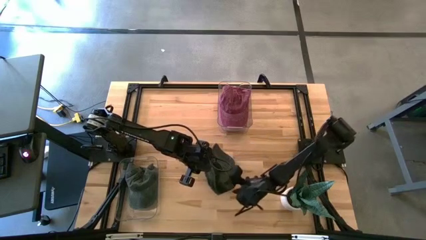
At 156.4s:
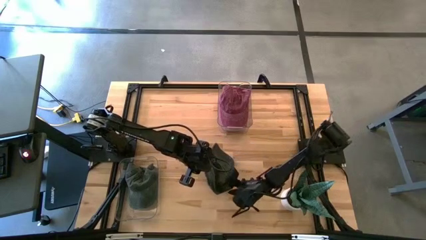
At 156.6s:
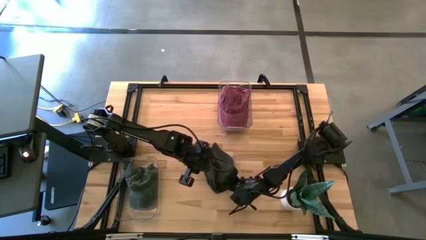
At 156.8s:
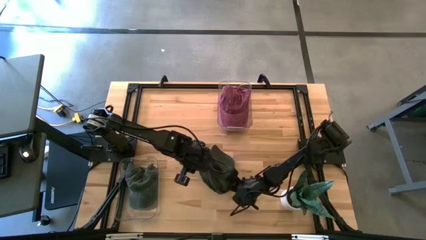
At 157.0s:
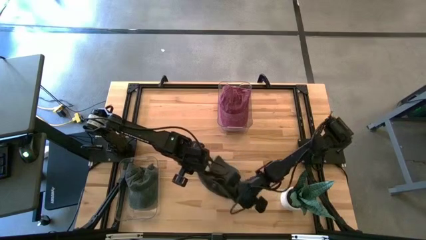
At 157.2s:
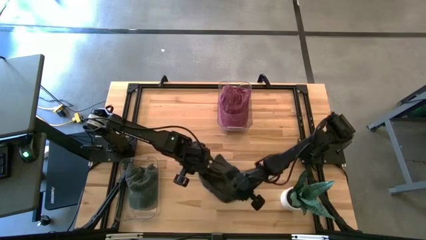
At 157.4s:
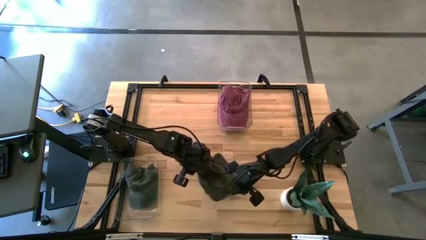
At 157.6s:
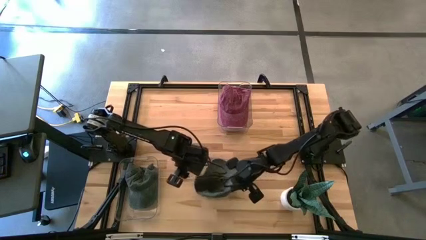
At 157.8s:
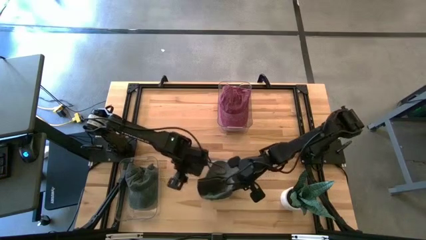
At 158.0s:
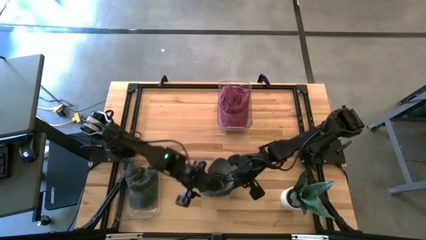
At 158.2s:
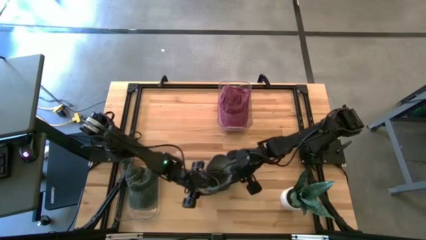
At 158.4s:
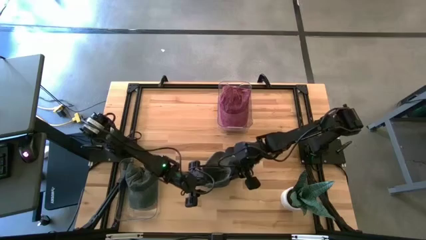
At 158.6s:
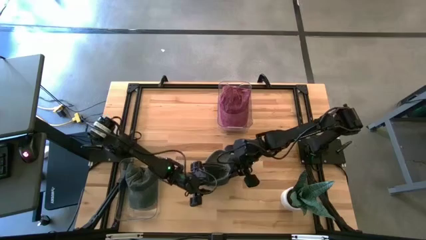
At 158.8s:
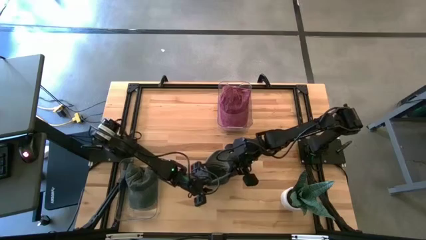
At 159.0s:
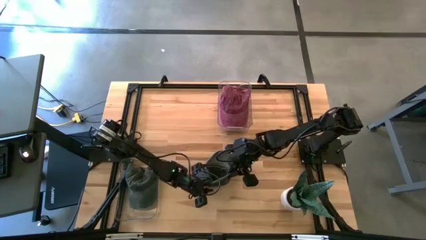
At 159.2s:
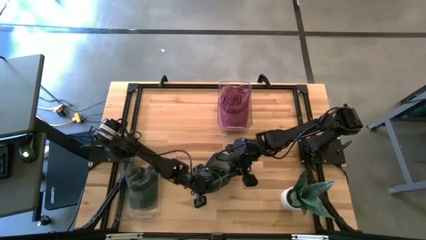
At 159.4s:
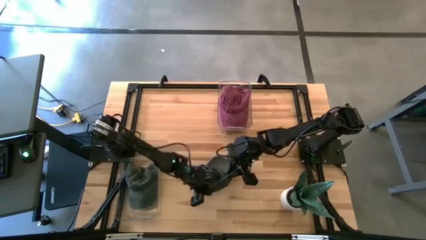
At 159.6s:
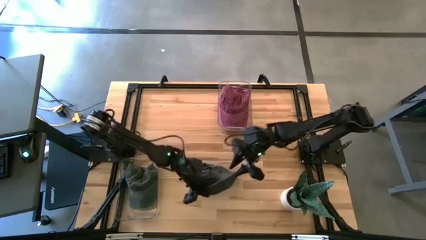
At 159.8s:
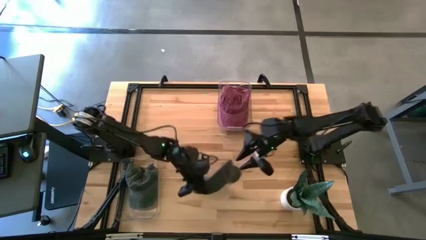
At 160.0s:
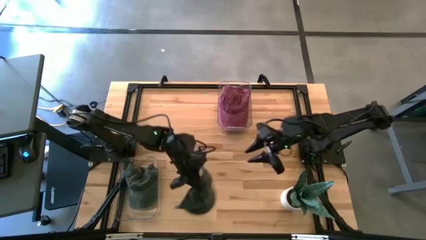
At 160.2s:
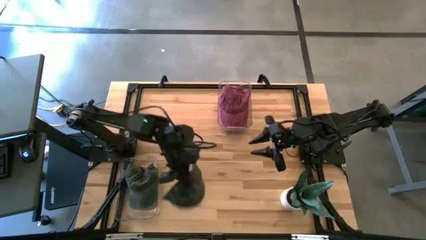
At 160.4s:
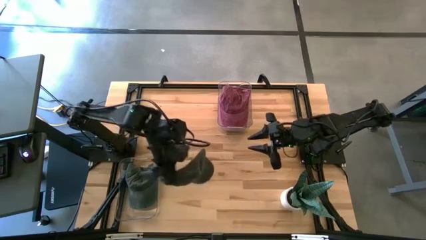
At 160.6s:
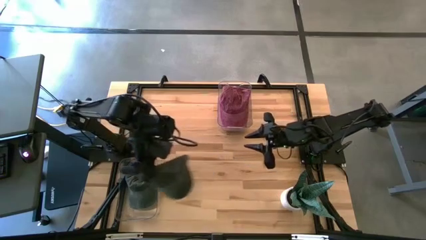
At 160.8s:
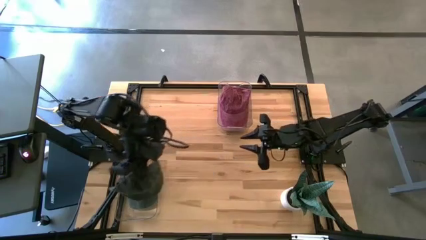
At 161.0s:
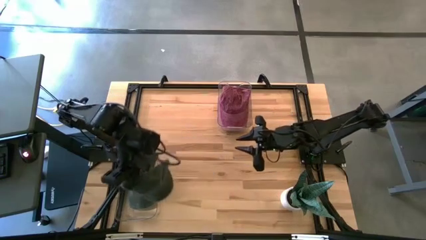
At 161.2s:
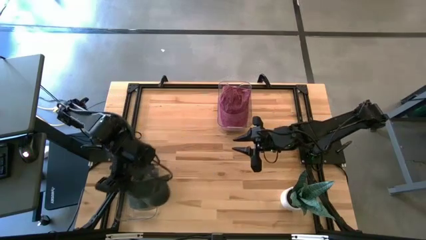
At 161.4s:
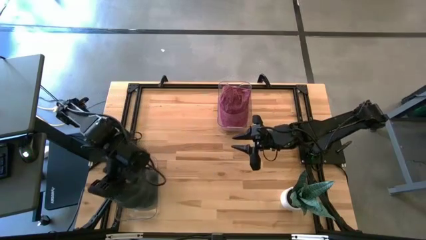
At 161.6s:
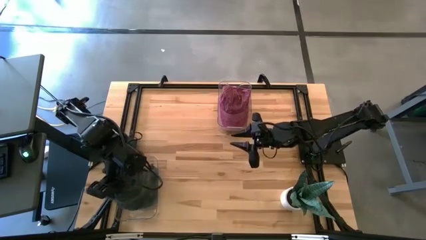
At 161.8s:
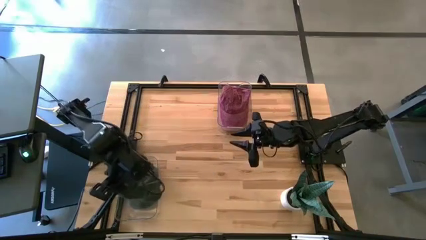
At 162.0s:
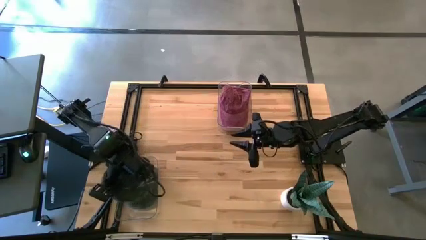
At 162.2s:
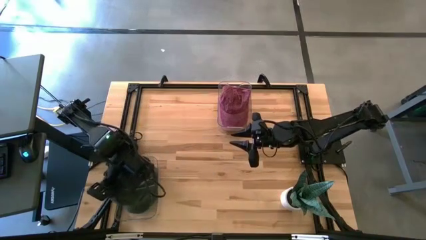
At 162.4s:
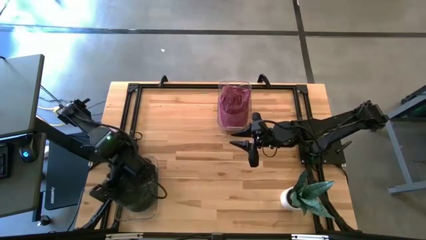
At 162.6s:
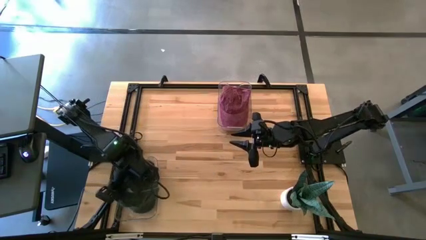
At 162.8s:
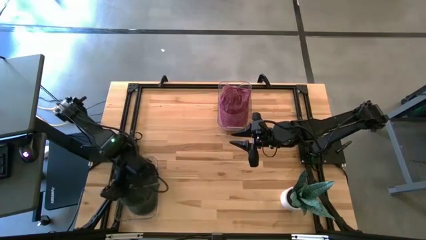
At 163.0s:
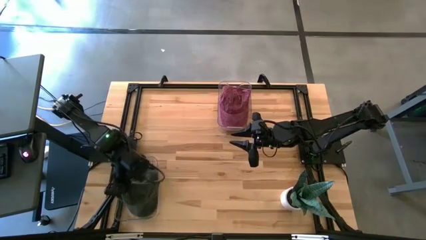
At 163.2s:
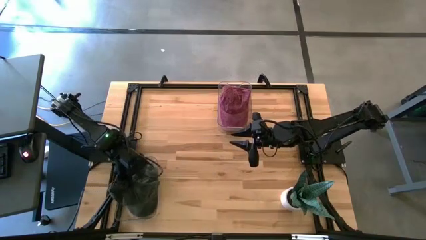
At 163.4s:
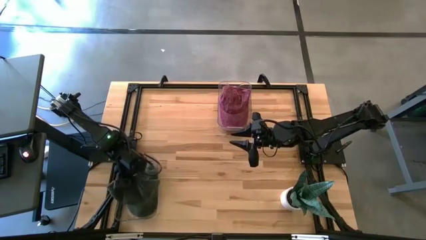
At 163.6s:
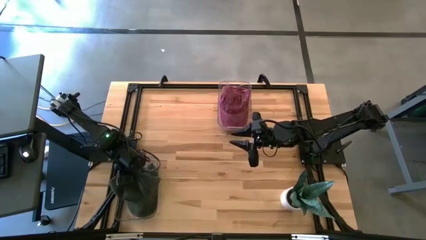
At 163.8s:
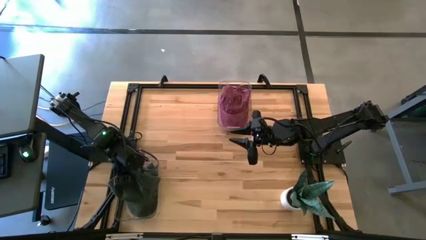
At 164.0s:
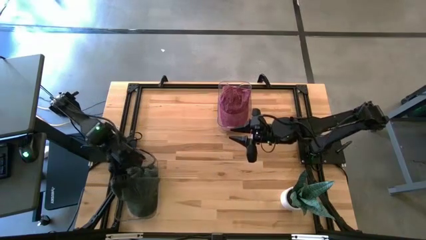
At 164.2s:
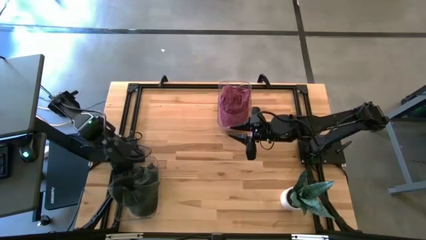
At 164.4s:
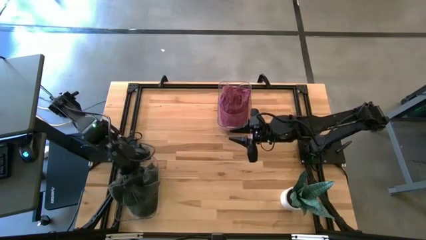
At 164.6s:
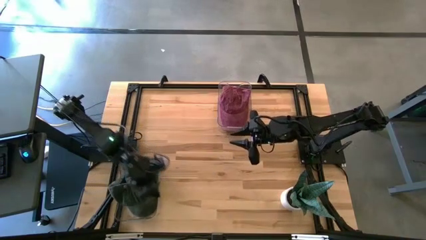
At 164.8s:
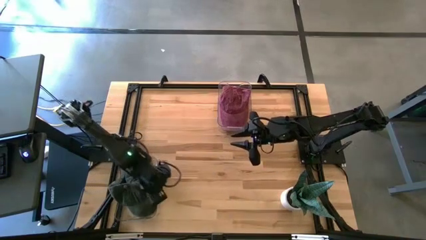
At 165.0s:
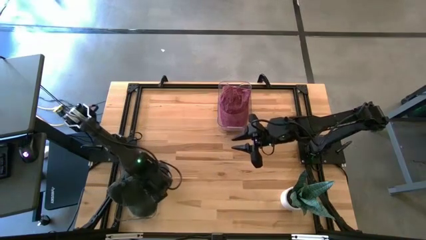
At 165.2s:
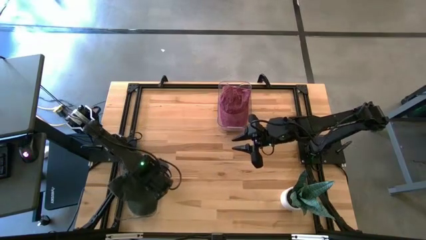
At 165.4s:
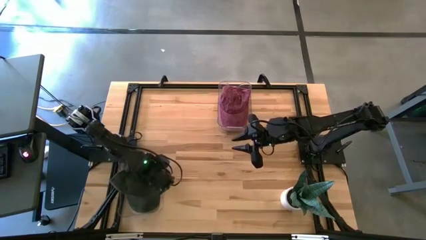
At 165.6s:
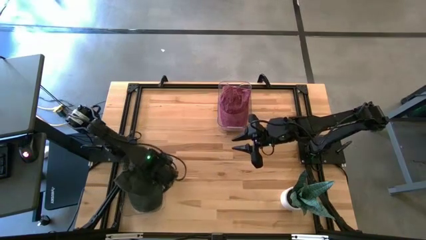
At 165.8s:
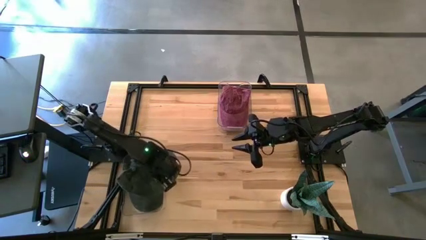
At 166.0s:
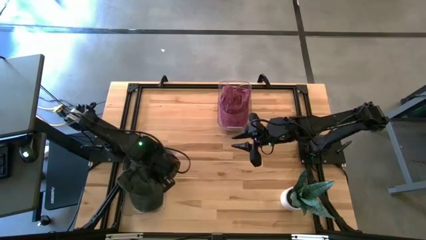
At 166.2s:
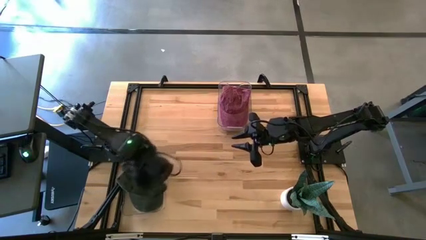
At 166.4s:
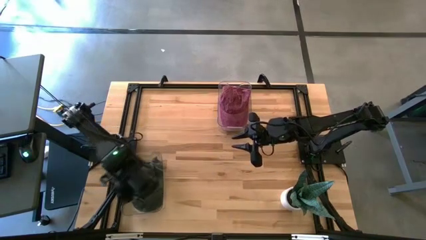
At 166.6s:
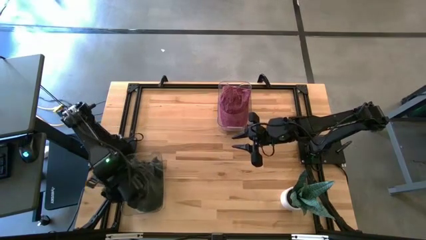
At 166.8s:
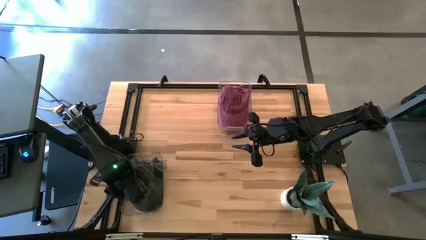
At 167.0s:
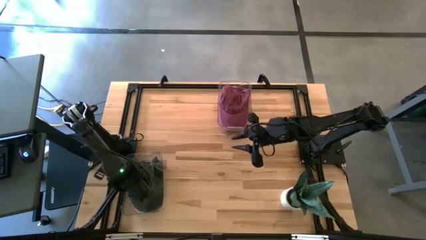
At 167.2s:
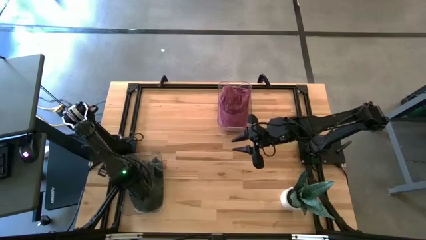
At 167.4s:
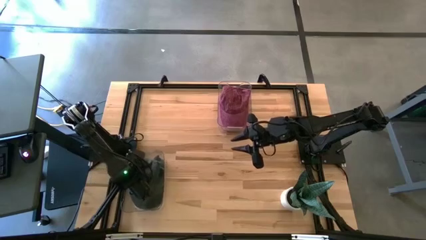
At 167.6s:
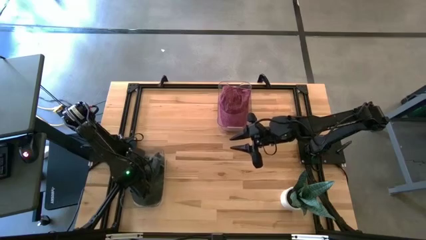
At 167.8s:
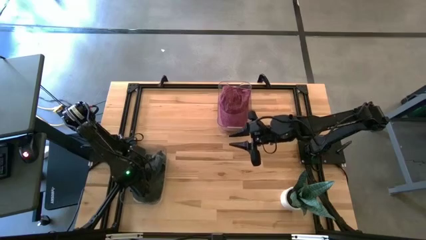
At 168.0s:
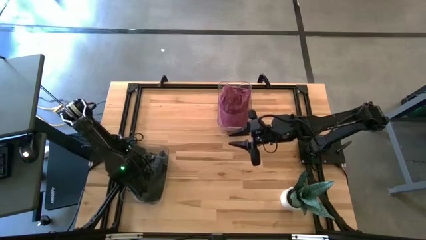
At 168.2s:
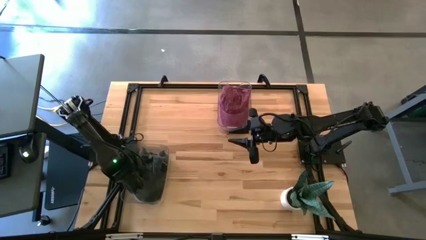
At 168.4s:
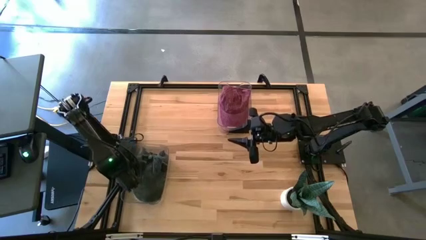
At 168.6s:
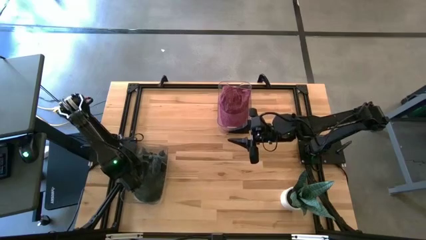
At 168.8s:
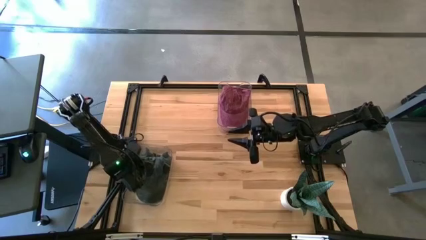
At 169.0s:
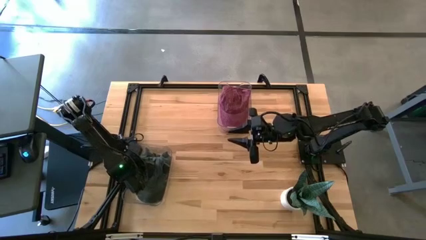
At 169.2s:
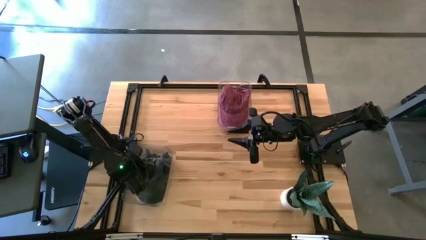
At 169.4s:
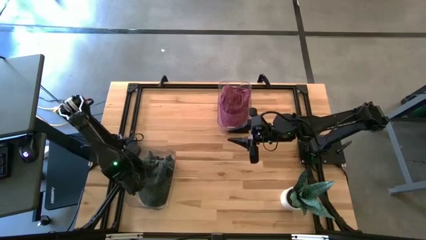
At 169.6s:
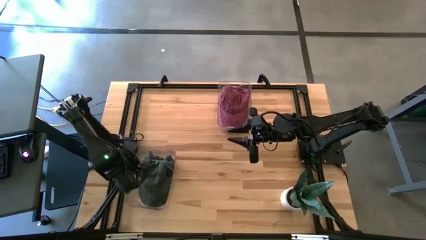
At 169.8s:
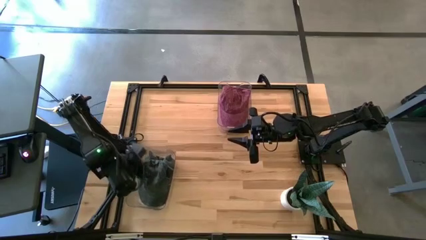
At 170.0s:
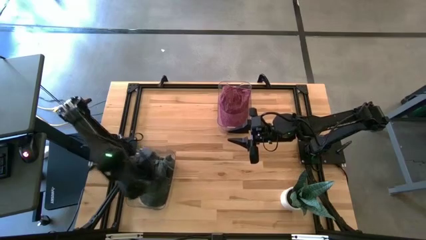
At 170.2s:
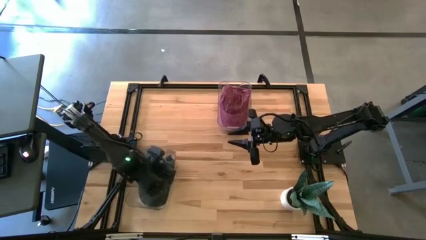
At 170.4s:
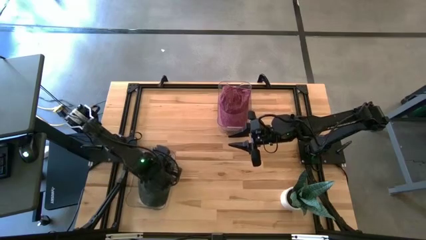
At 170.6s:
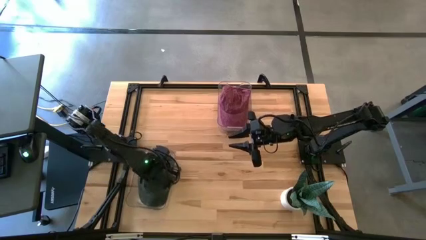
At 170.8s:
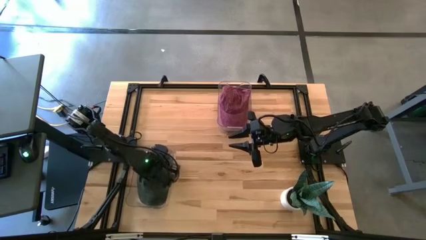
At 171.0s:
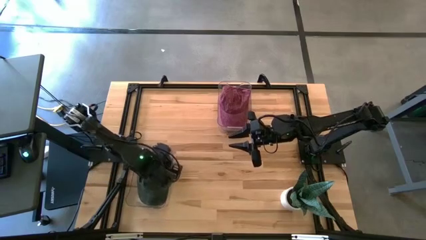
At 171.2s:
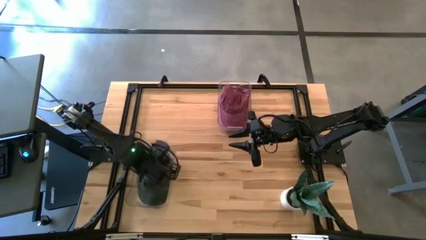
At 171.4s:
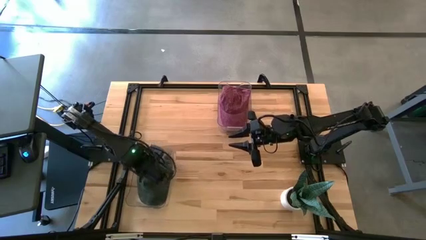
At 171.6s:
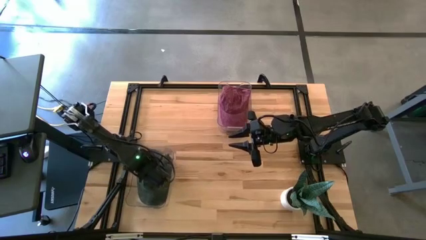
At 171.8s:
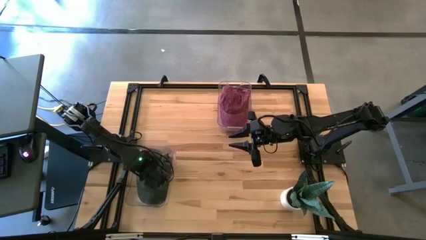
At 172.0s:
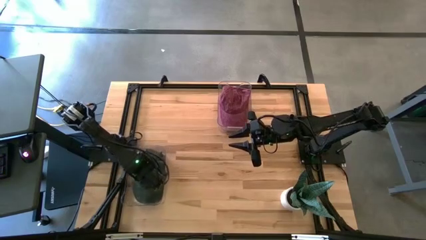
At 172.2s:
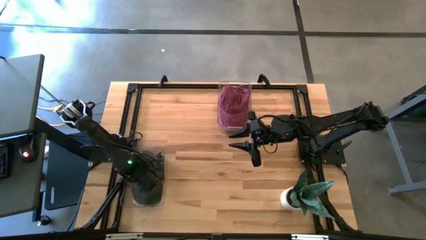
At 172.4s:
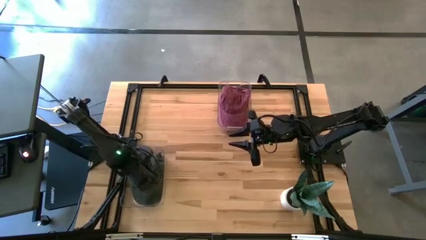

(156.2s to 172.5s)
Task: Pick & Place hat
Put the black cap into the bottom transparent bin
